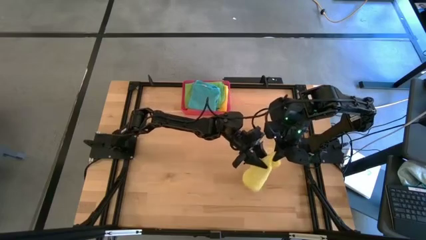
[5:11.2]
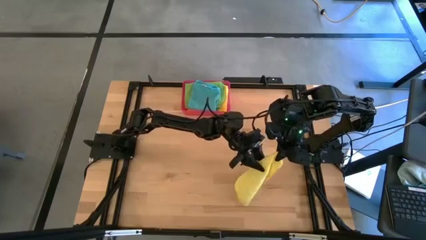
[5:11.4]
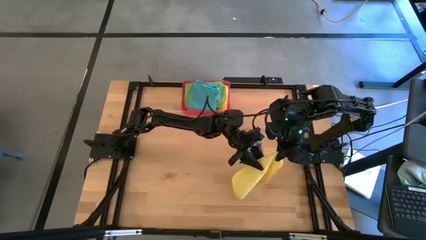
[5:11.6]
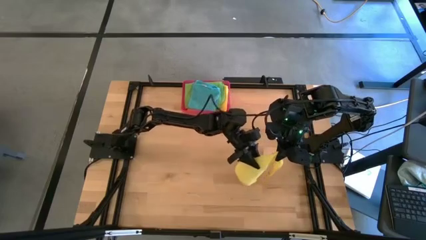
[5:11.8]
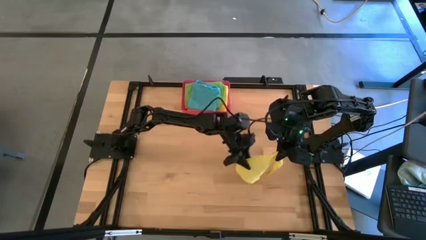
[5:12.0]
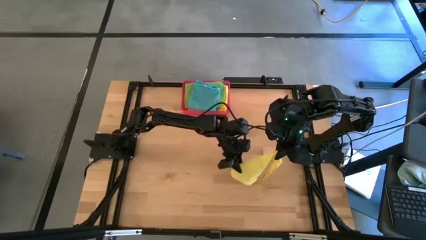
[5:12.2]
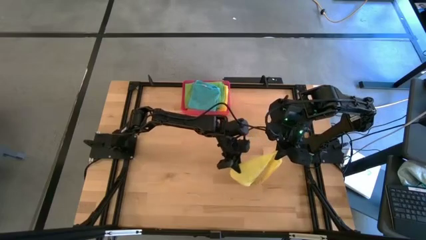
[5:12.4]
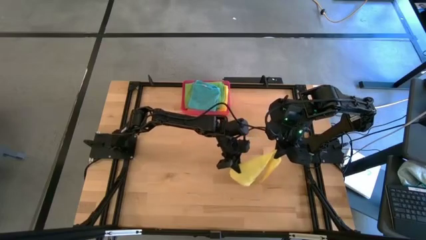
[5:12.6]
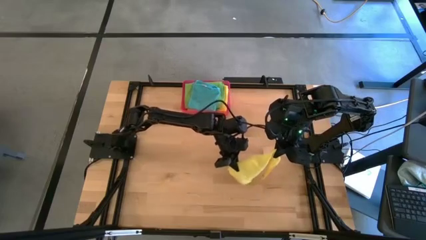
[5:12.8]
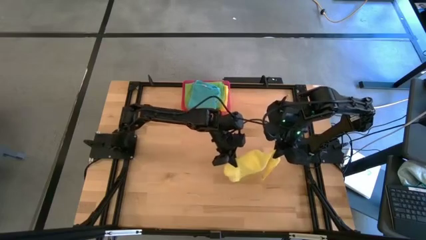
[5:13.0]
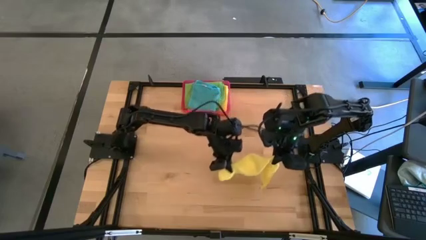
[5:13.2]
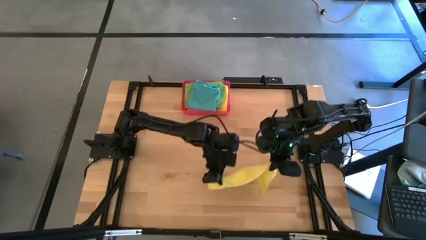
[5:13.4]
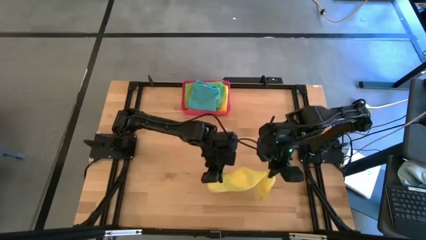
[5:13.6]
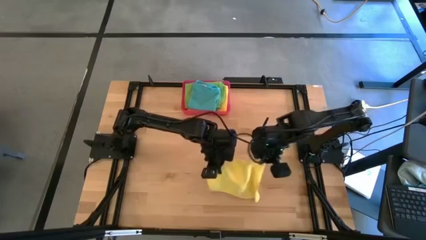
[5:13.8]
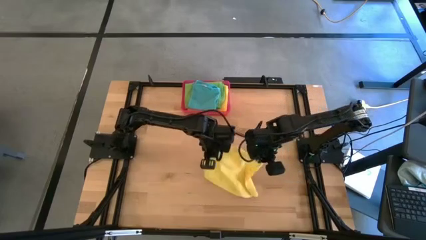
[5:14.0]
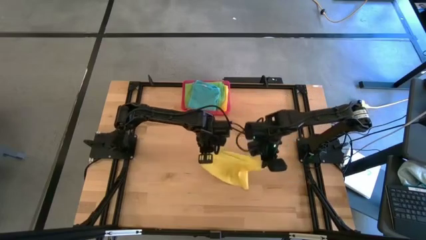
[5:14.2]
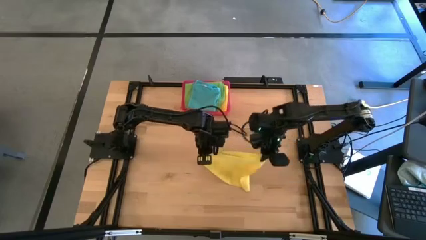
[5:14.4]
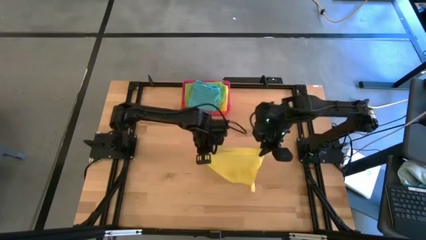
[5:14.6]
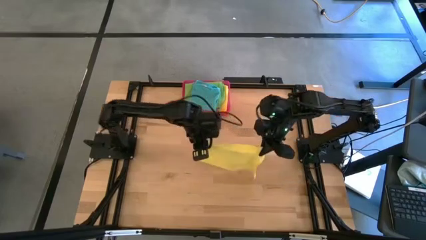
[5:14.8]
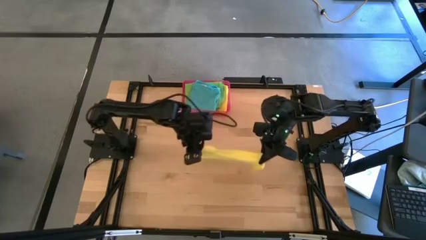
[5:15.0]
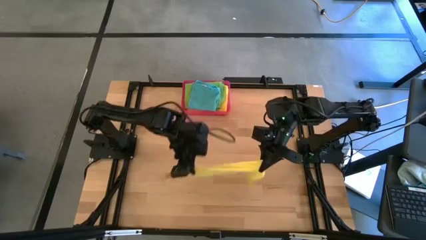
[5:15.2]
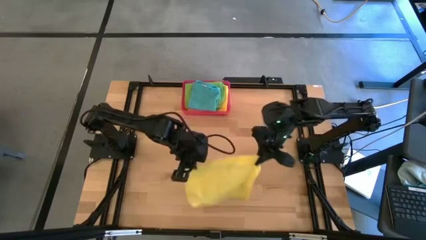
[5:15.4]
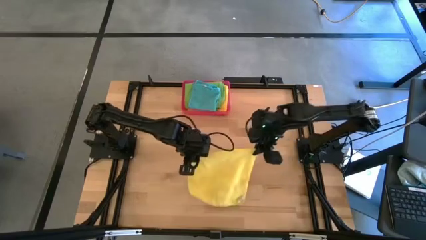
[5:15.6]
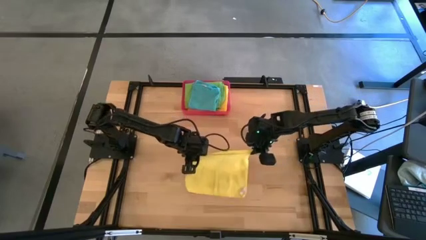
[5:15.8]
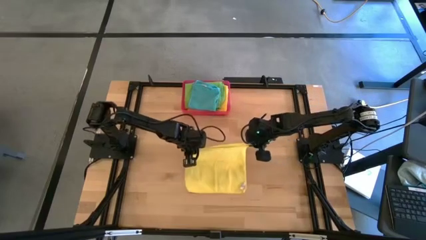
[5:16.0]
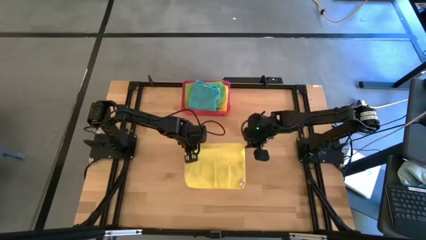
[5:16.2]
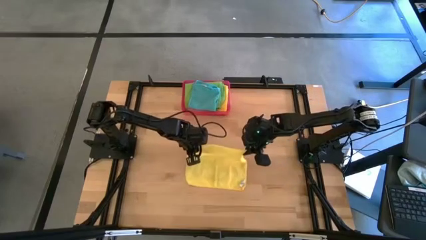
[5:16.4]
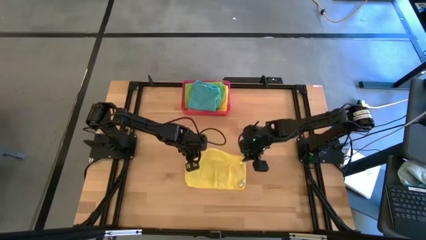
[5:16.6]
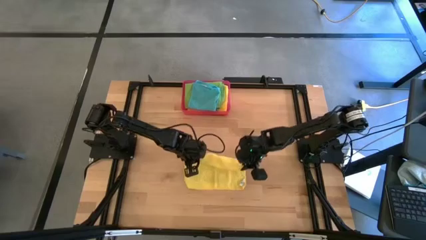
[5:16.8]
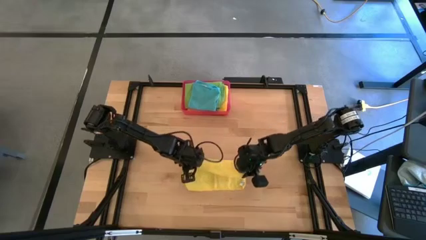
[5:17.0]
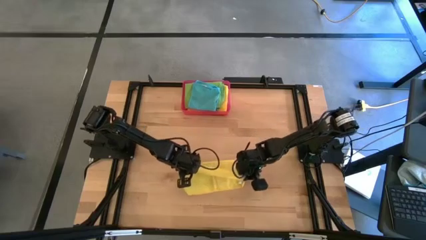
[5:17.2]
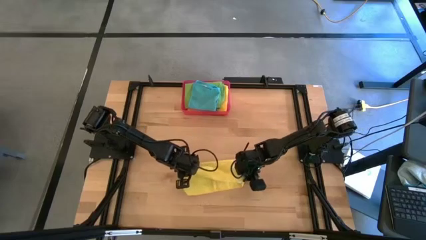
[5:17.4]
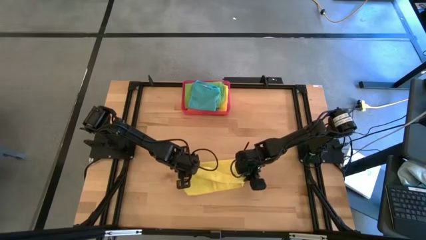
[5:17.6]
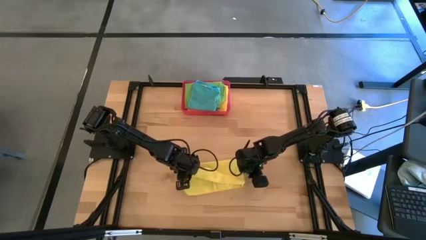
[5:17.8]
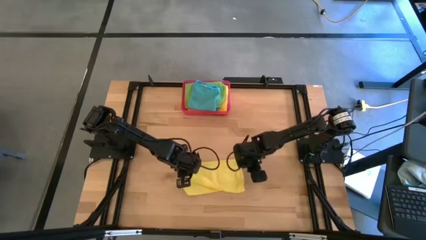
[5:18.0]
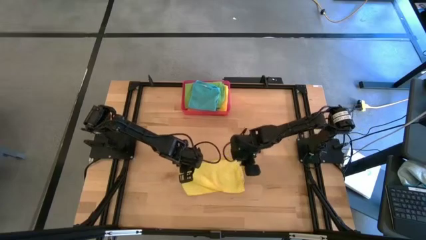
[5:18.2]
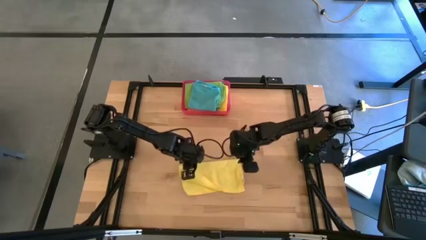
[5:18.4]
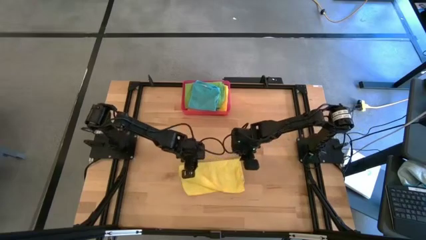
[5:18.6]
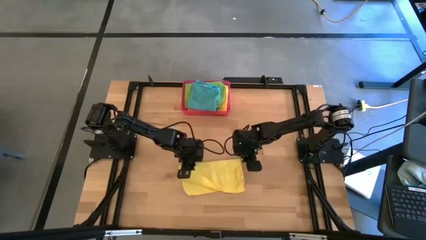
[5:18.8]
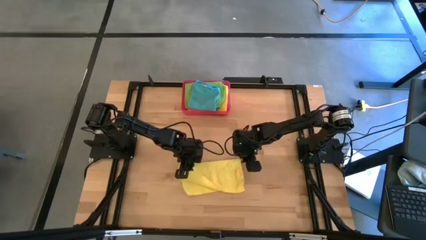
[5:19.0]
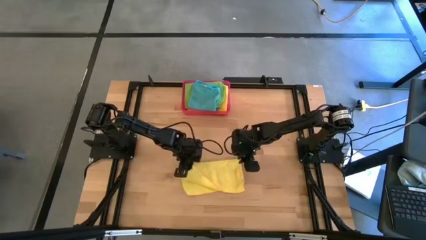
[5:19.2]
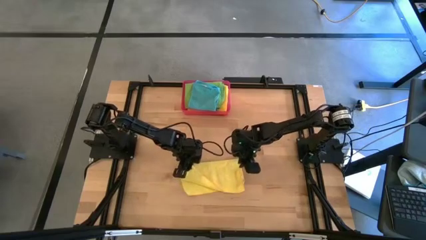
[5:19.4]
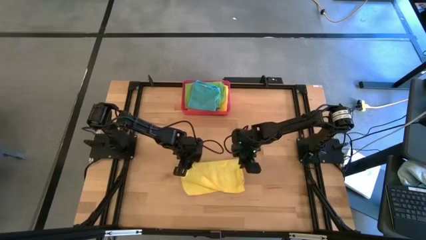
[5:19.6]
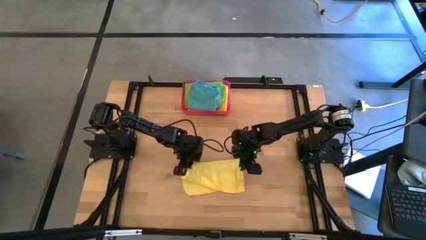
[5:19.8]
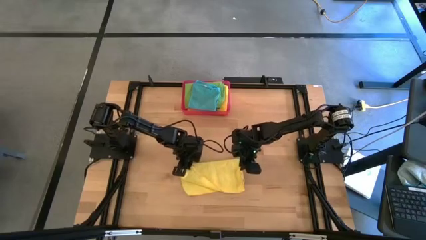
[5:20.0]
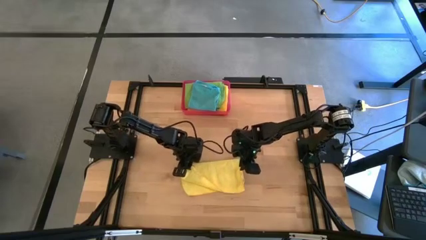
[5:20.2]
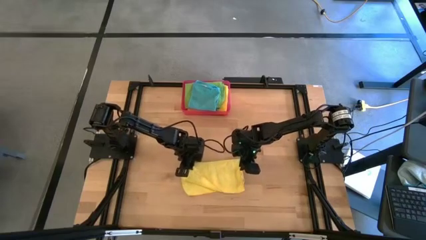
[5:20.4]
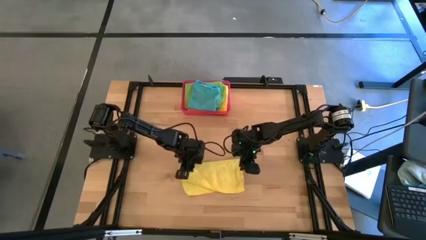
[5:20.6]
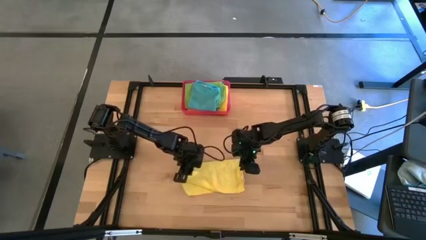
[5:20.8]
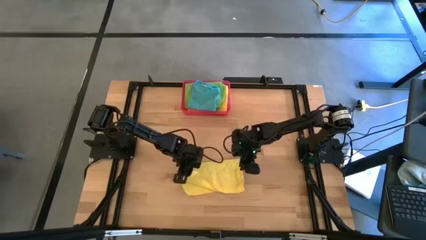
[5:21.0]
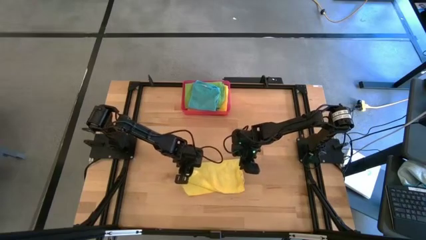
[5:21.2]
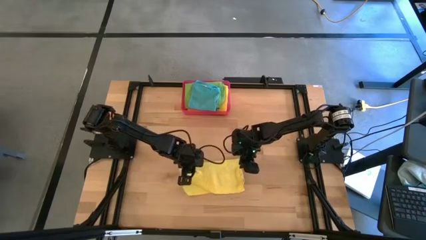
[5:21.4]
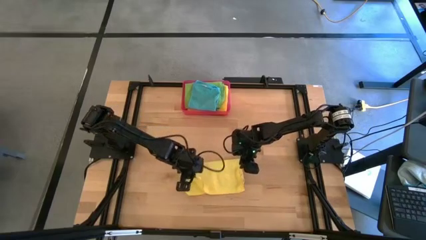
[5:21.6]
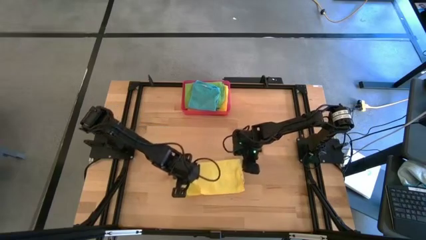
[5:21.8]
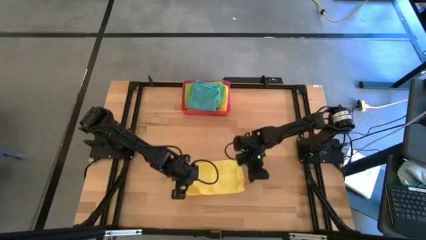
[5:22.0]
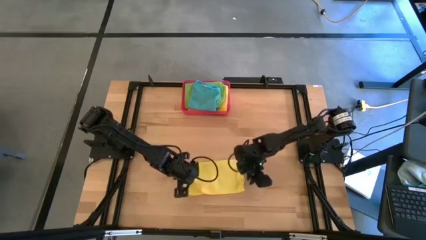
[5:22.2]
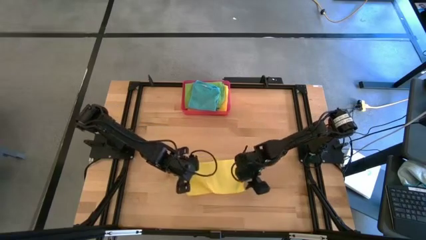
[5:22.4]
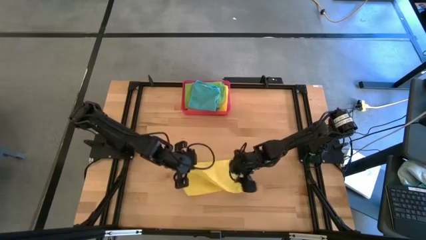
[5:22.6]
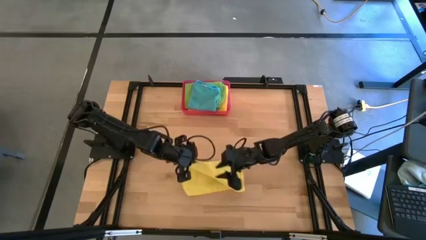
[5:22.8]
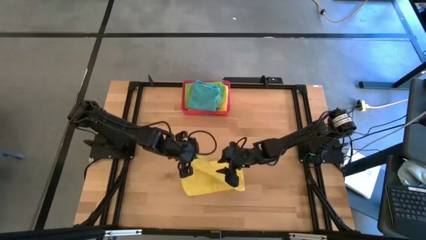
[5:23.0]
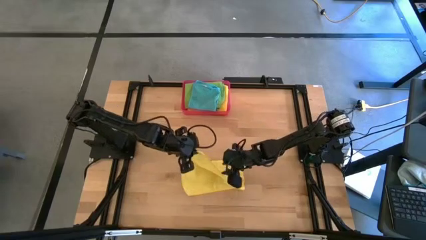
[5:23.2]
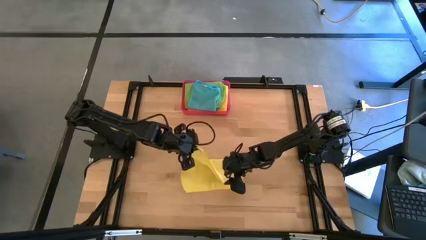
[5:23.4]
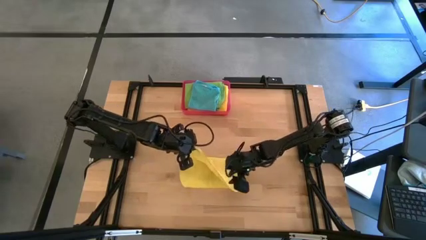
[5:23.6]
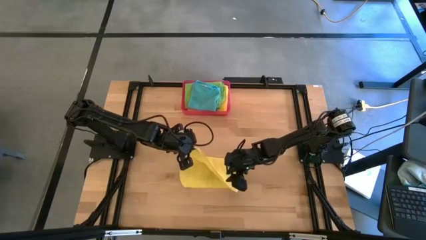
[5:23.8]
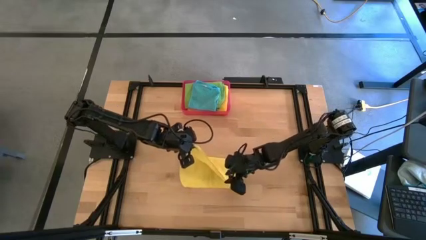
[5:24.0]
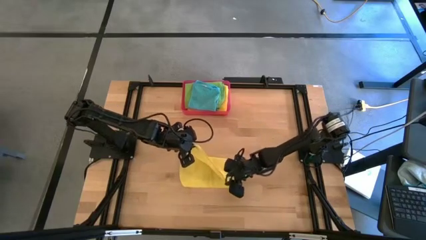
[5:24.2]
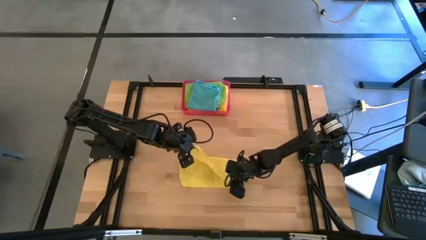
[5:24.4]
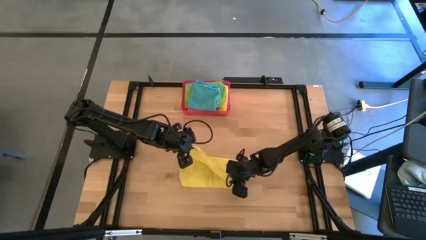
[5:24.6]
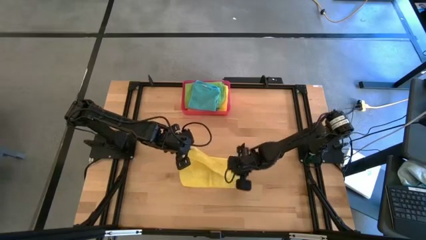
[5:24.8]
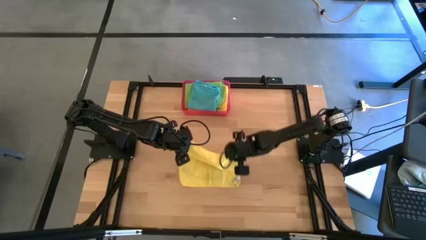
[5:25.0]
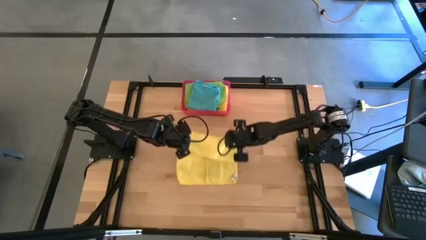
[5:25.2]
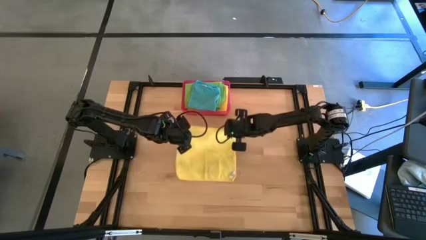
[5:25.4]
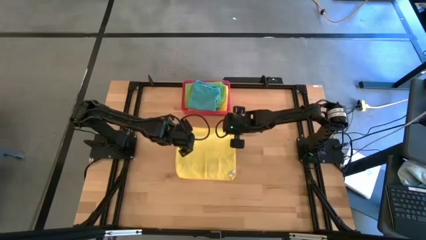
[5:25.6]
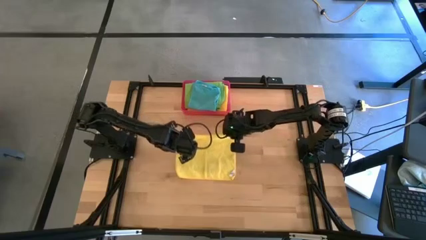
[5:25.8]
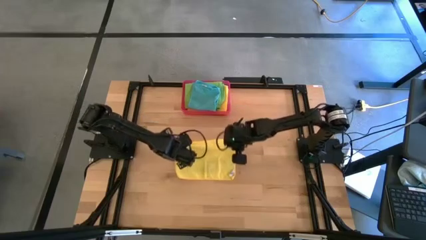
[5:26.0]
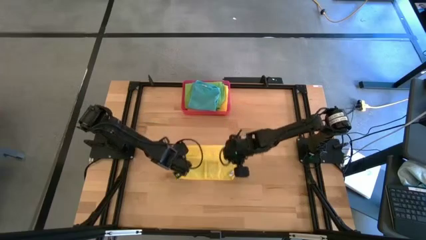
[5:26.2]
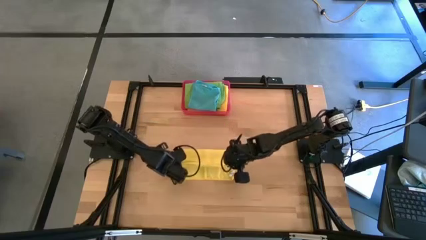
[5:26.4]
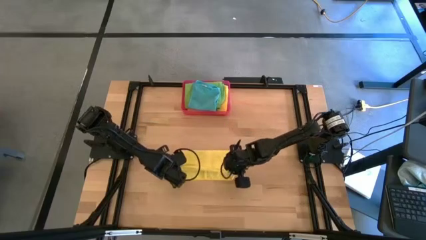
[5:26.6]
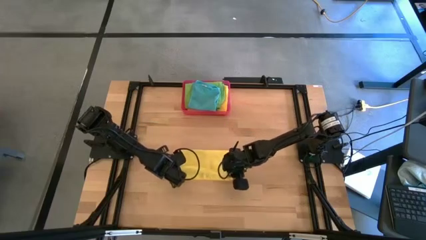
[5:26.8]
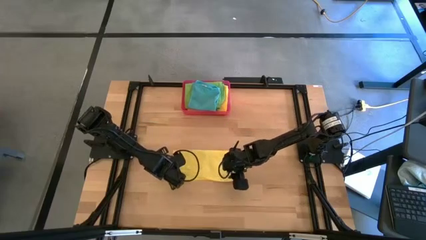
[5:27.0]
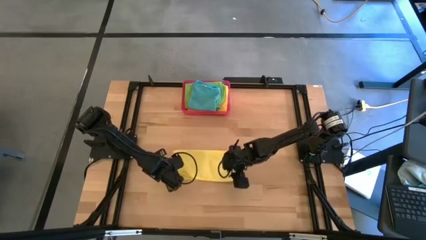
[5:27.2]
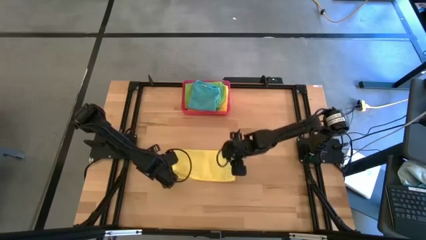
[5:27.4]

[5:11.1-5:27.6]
Task: Fold microfiber towels
Fold the yellow microfiber cloth
